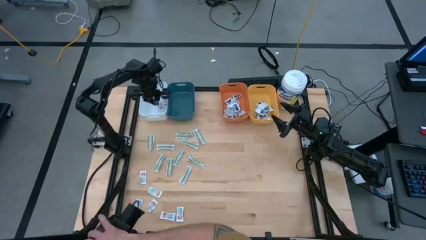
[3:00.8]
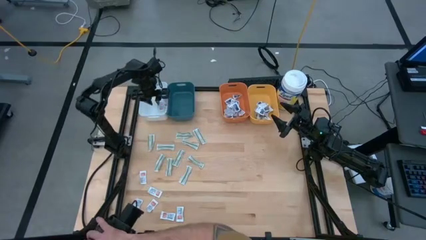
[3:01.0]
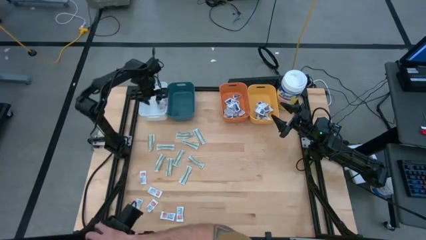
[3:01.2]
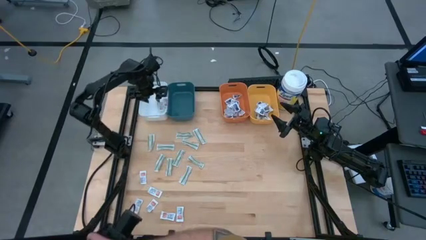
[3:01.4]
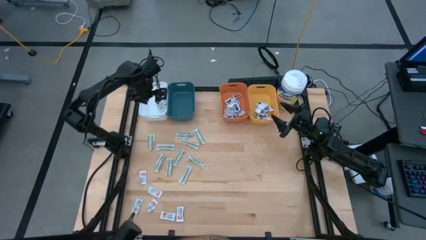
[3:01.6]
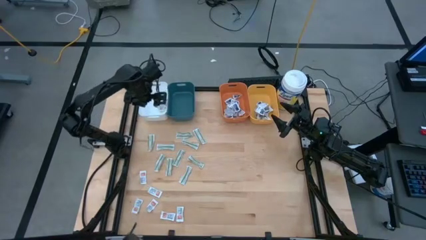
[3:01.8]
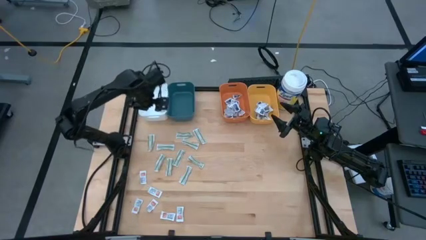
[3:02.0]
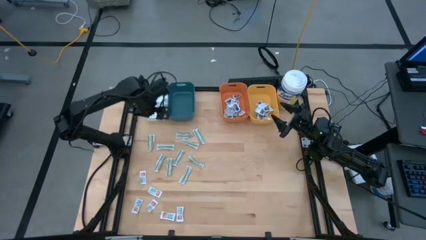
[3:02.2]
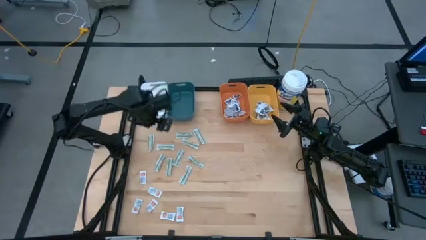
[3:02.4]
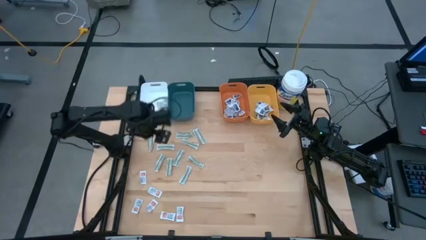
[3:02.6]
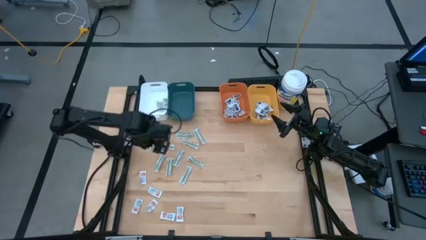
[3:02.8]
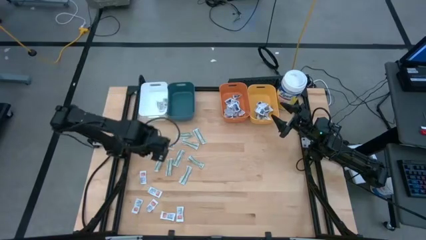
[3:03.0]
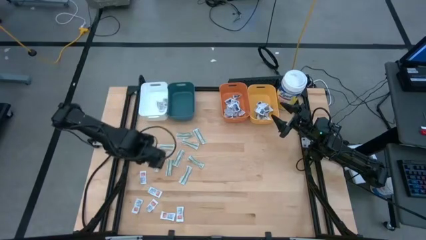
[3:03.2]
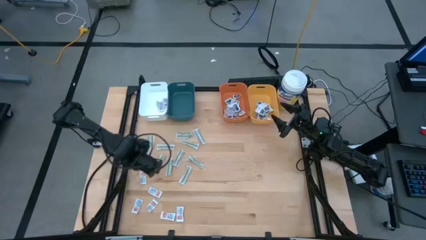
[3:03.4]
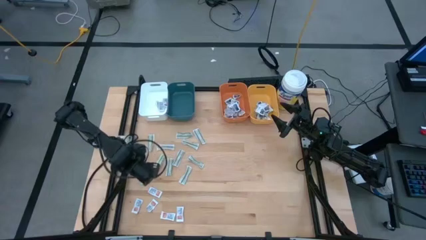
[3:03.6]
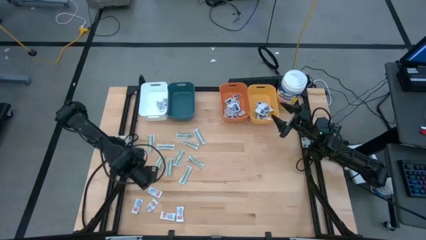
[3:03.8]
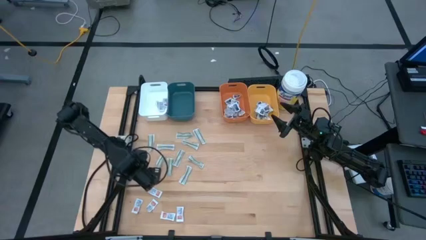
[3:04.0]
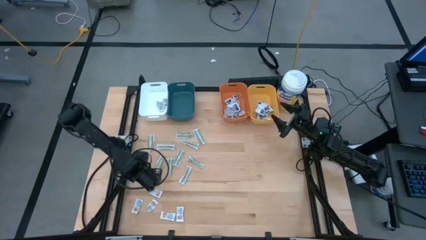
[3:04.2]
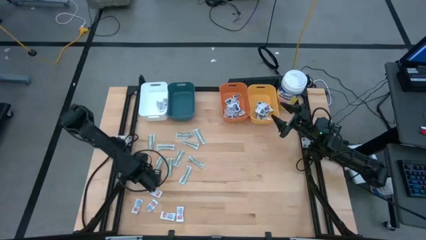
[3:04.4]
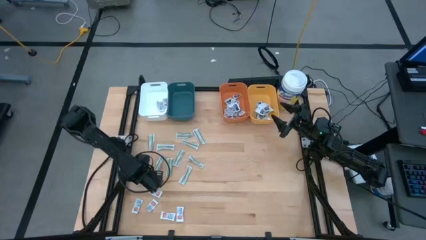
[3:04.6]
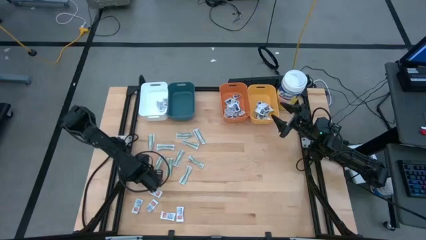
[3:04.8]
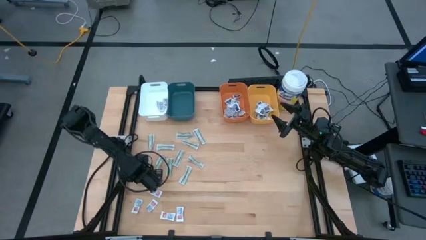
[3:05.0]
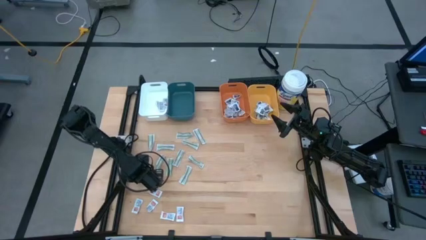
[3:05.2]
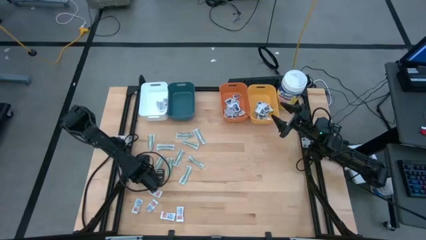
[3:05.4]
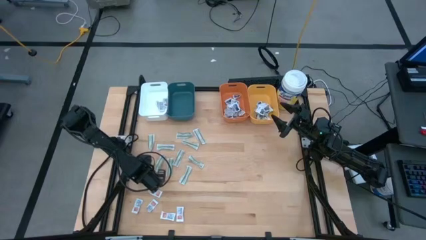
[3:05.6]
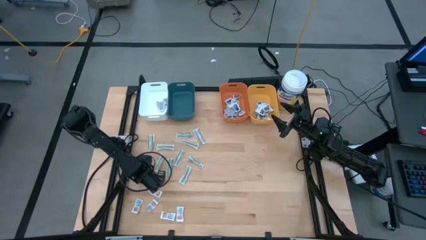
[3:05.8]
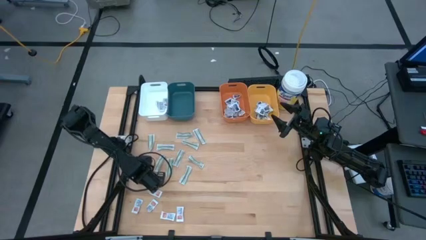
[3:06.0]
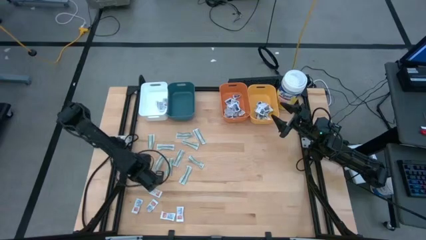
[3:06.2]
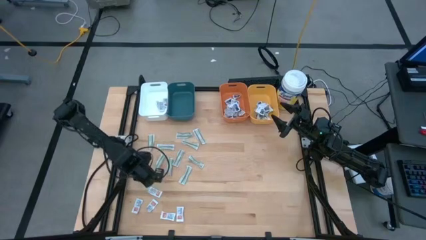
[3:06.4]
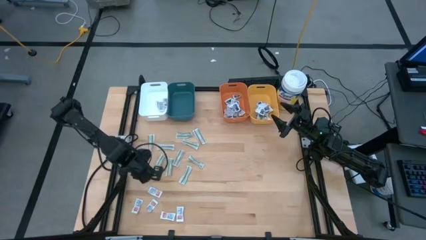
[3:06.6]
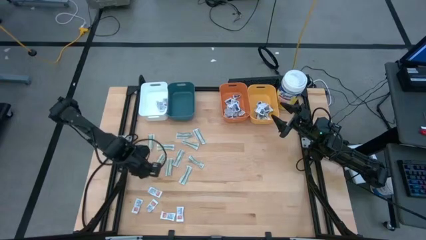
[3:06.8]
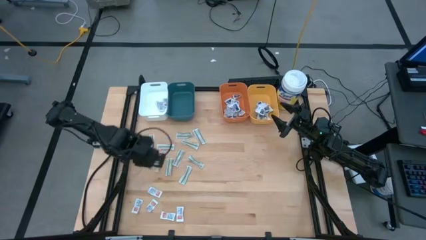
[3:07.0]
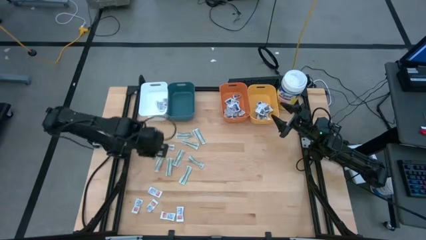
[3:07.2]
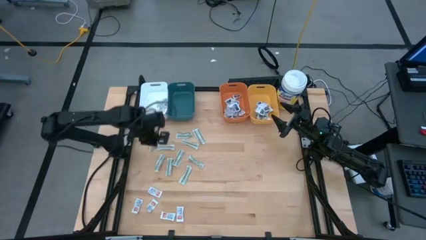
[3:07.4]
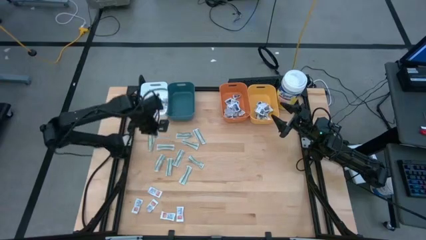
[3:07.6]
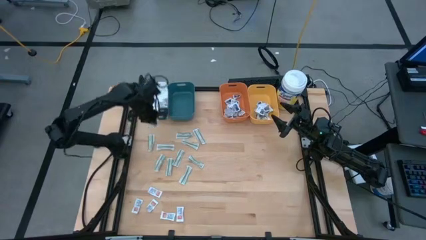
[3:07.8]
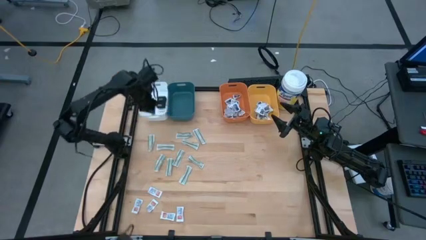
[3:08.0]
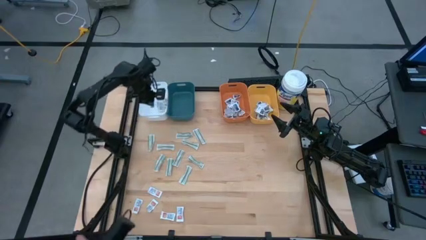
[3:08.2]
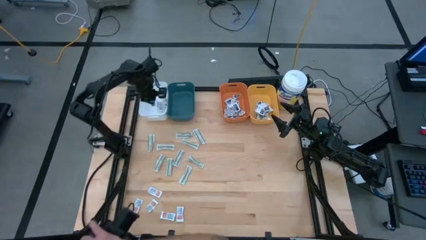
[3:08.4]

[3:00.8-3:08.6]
Task: Pick & Place First Aid Supplies
Put the ointment pack into the white bin

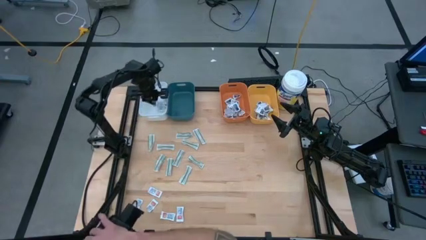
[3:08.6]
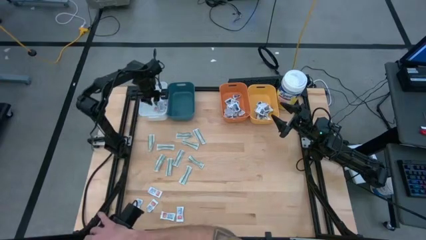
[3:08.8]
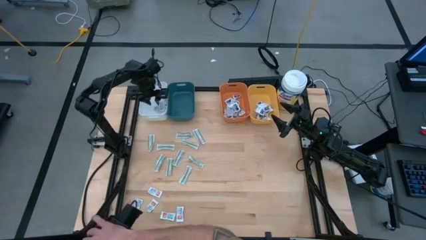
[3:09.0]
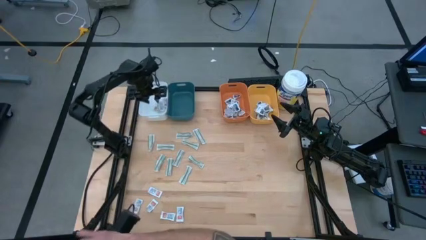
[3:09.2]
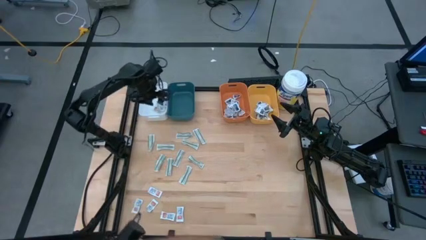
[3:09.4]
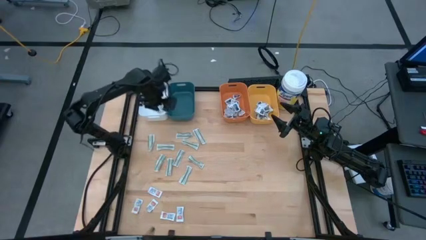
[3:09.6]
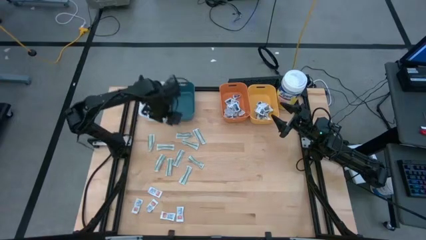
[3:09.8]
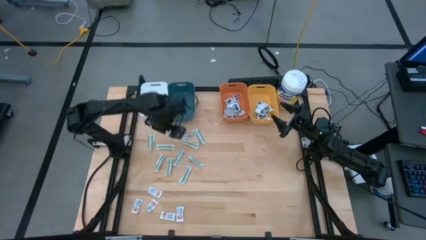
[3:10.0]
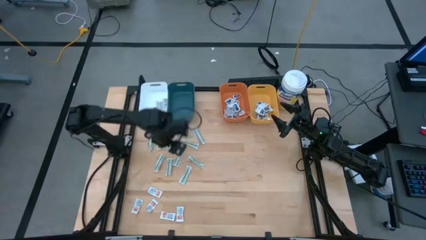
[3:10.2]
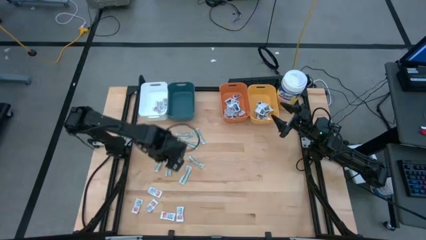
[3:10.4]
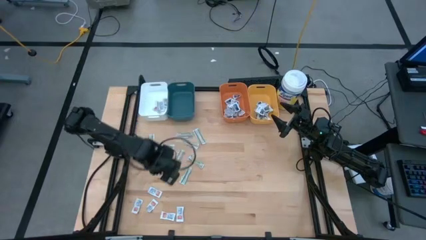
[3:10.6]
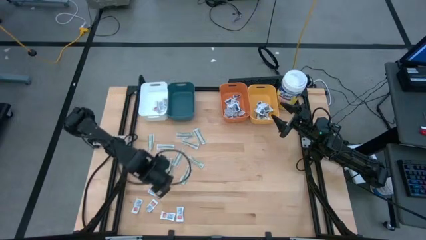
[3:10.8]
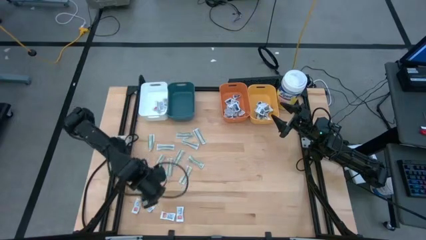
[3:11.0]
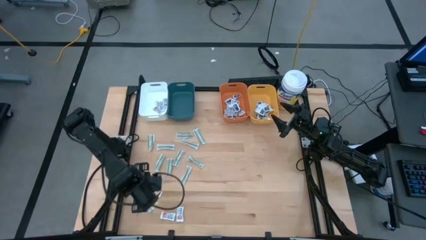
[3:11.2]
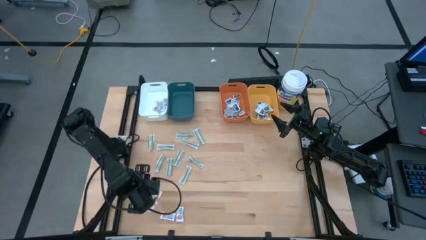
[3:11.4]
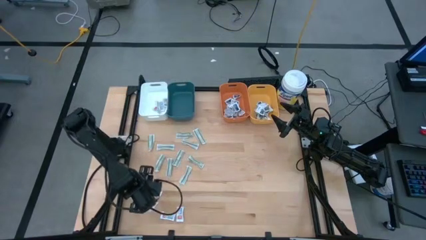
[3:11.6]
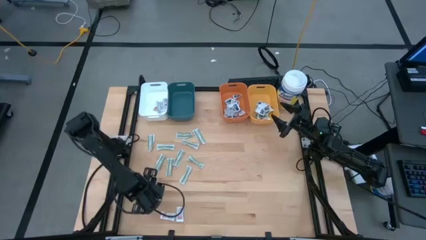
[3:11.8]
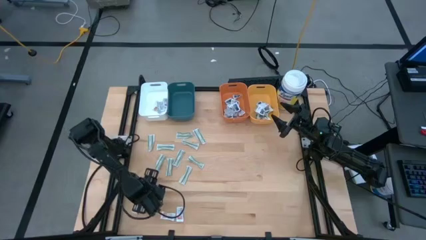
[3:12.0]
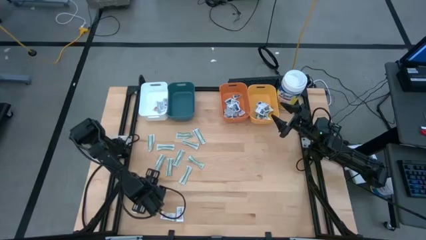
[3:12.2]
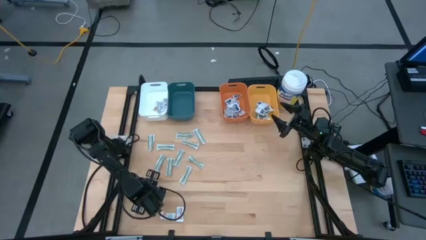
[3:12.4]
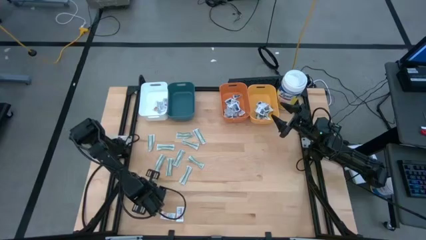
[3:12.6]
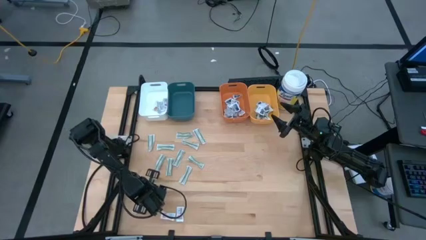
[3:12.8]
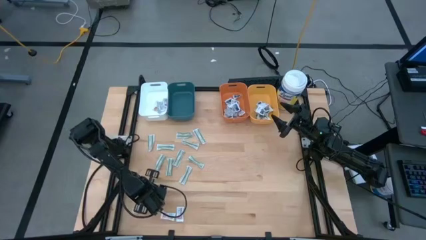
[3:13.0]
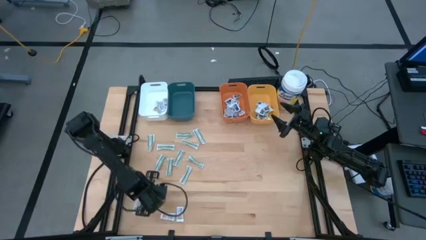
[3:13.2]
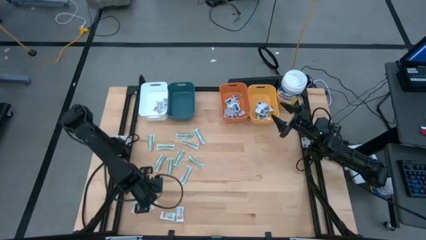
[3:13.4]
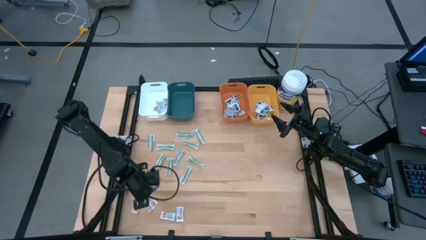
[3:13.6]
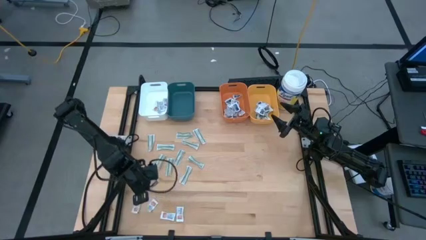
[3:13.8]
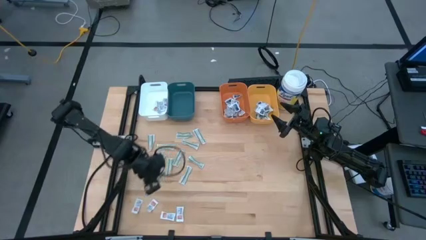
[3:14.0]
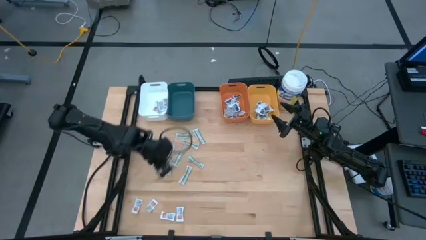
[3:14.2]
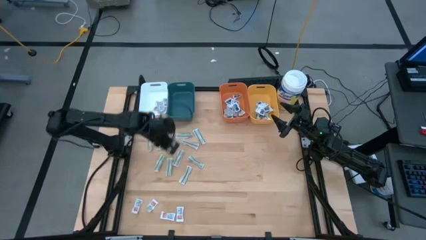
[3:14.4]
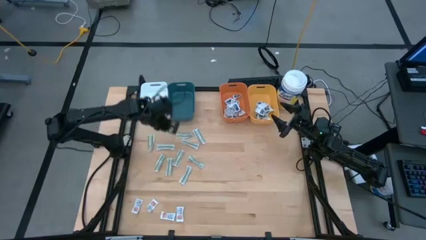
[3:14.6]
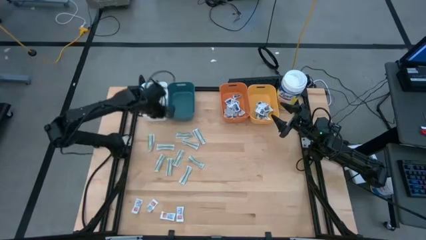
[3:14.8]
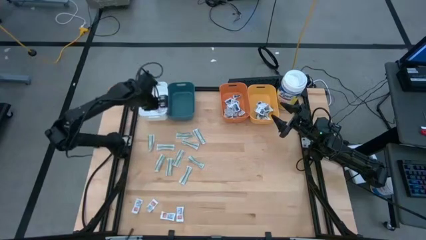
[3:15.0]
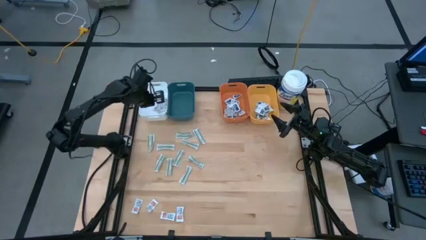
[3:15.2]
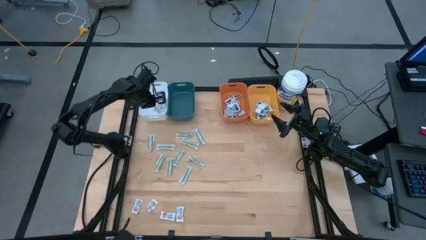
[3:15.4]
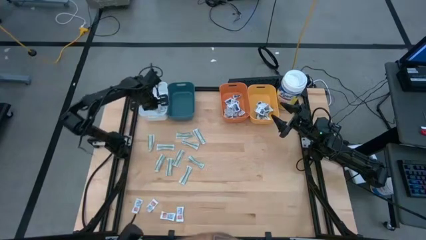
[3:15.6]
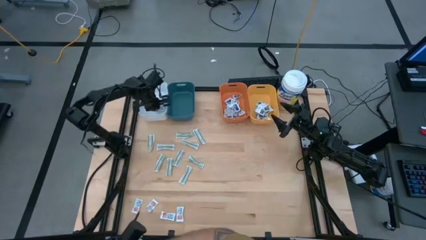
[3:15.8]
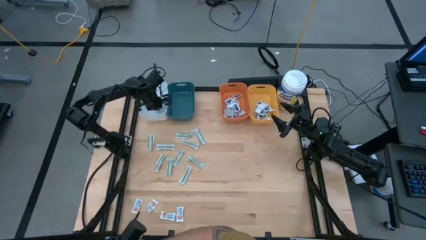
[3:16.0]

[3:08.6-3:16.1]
Put the ointment pack into the white bin
